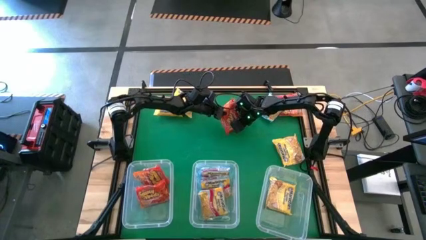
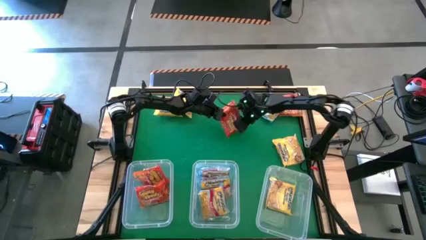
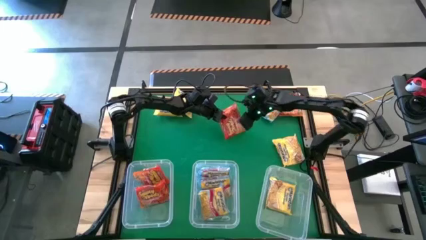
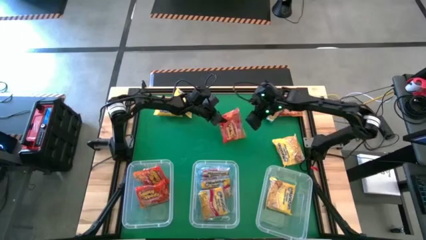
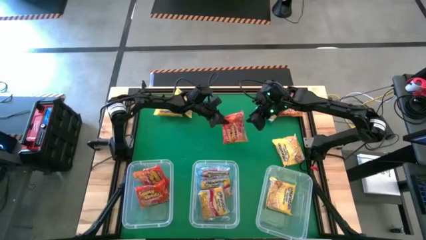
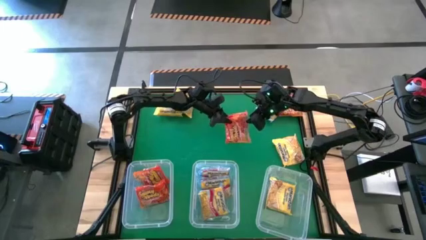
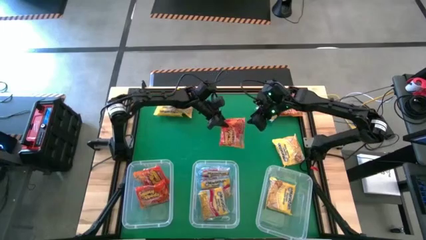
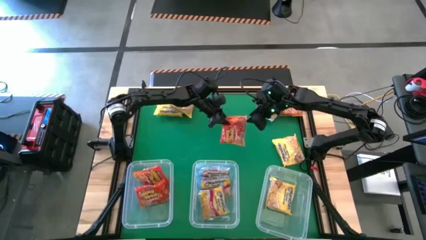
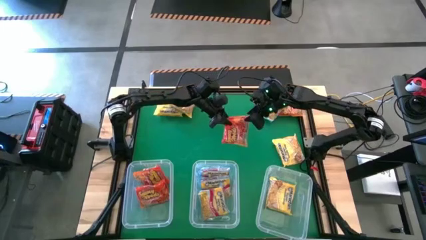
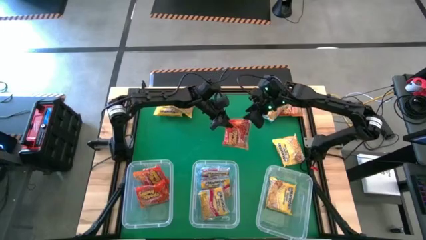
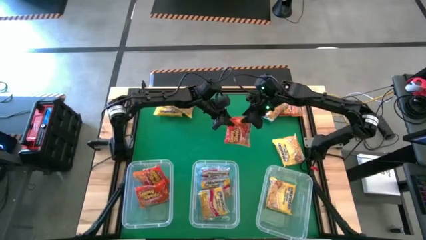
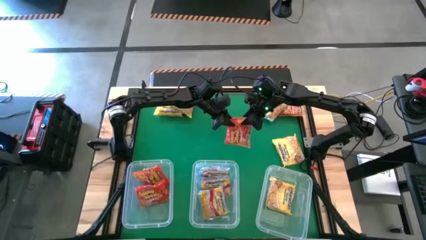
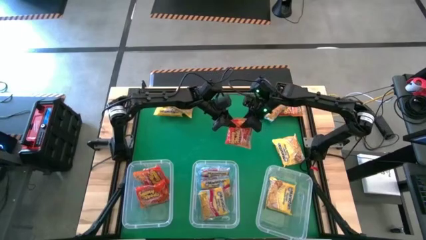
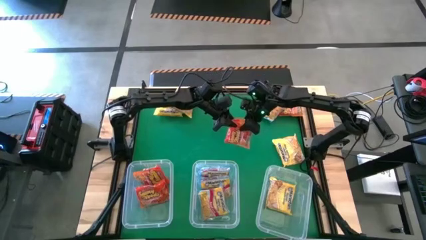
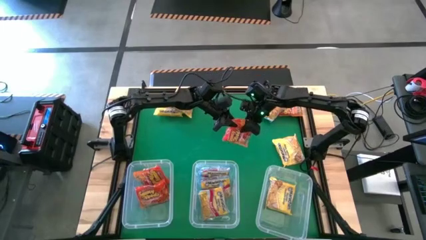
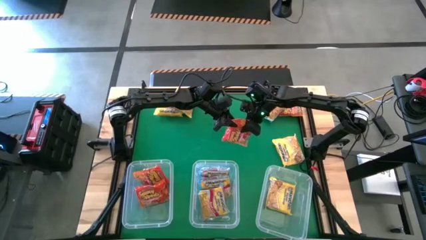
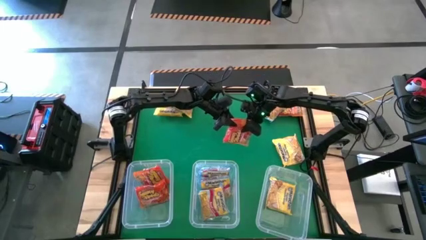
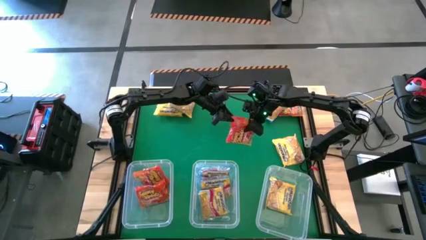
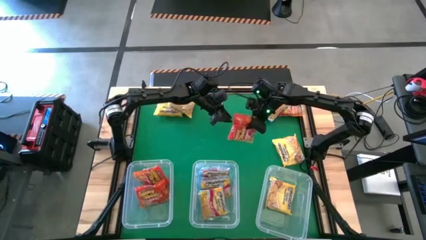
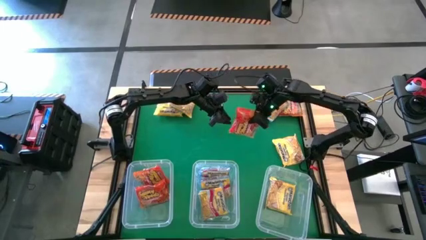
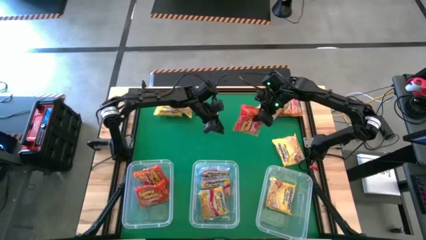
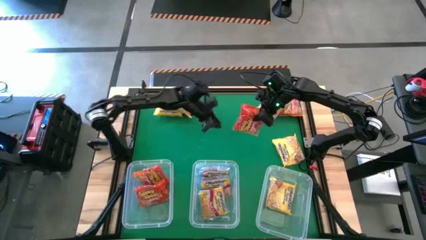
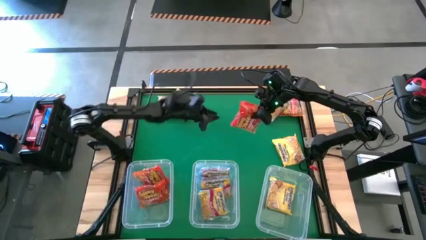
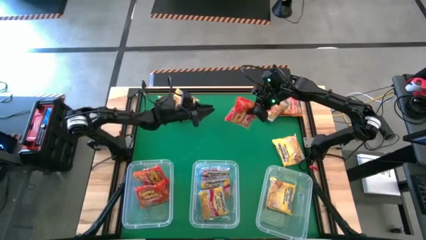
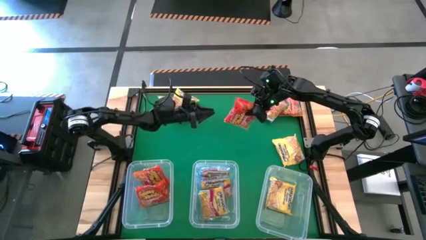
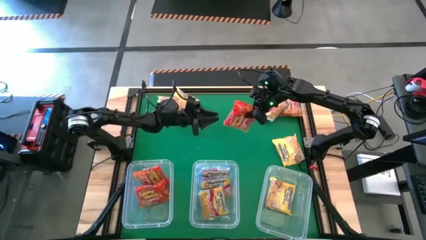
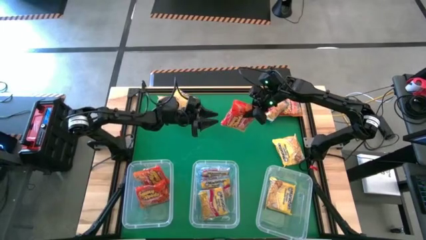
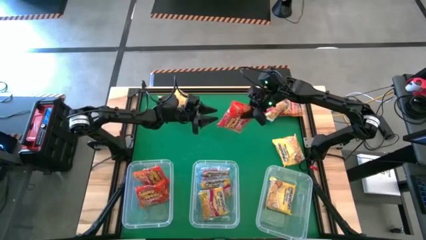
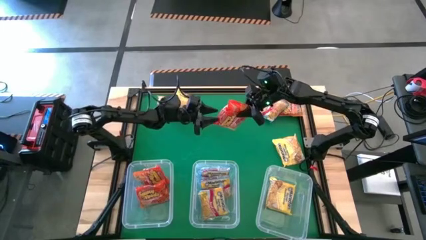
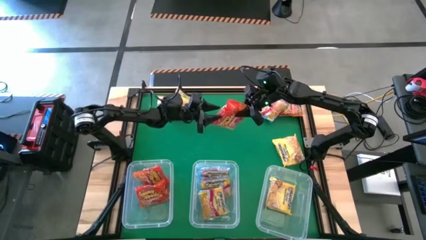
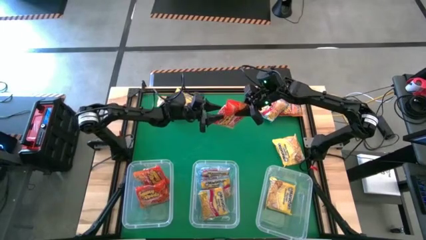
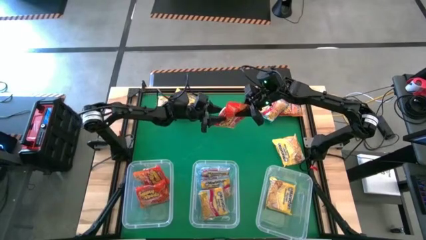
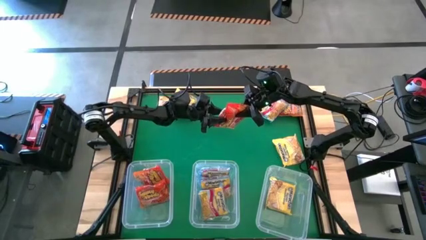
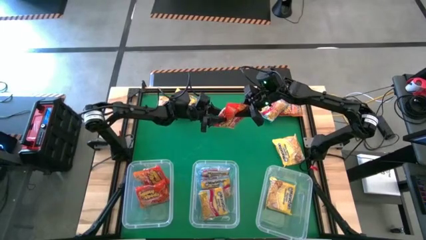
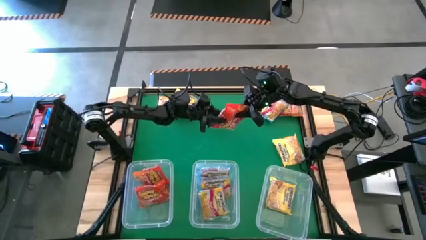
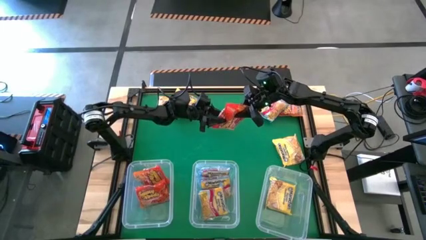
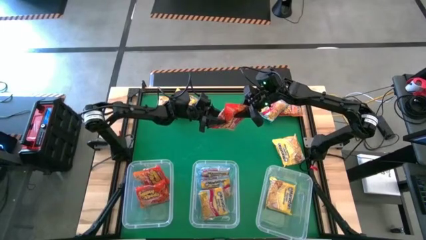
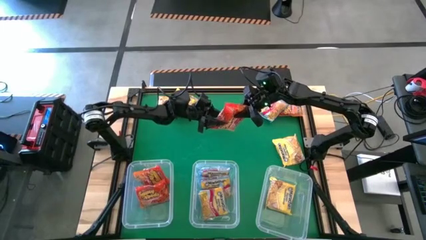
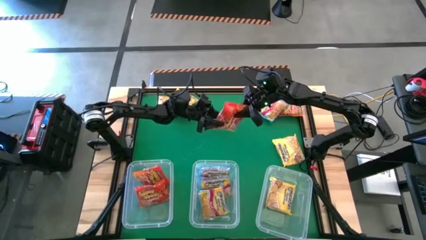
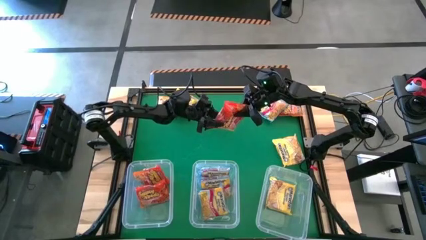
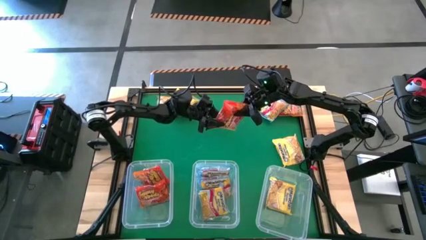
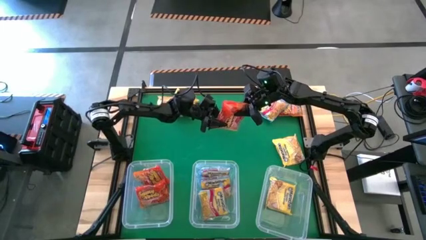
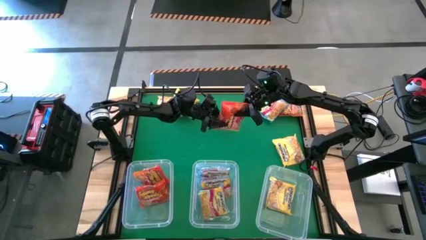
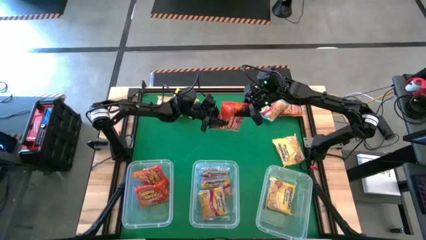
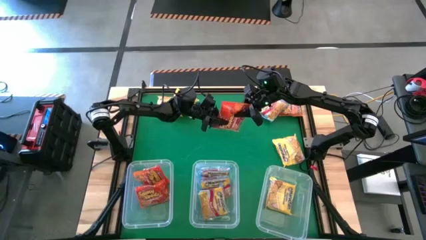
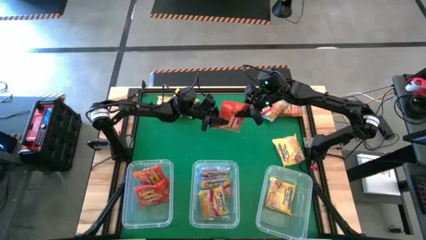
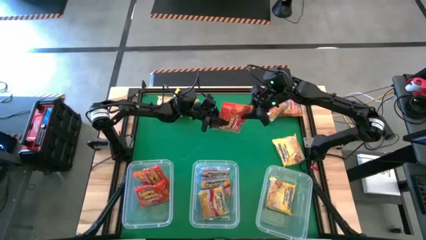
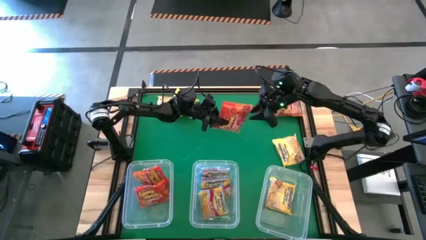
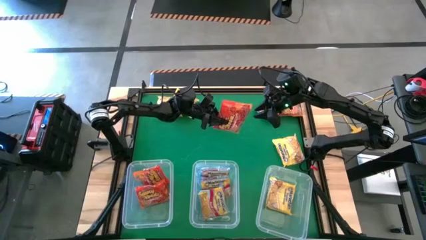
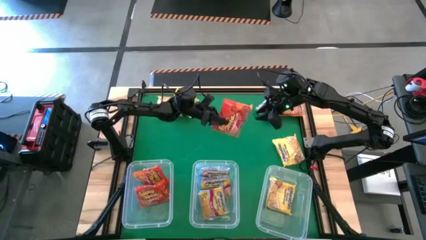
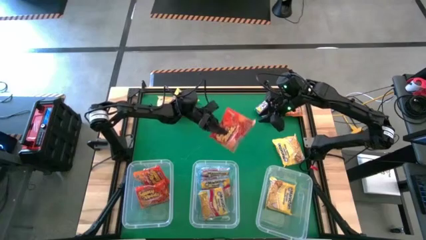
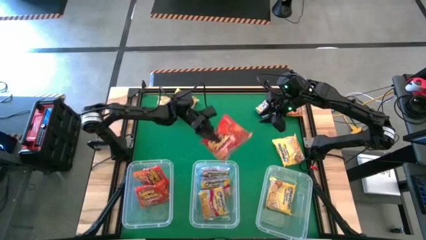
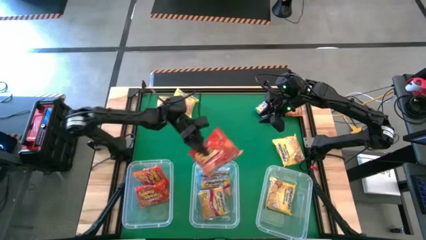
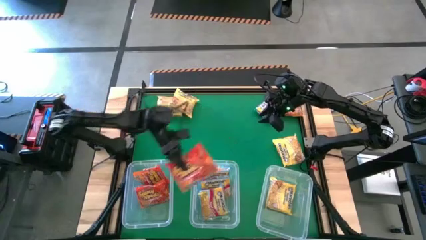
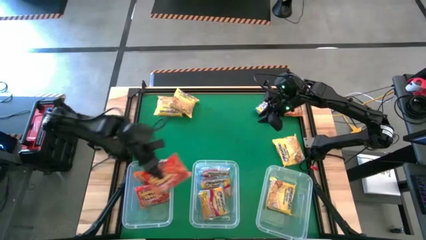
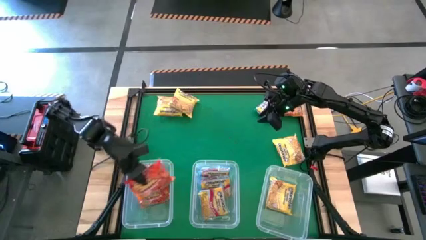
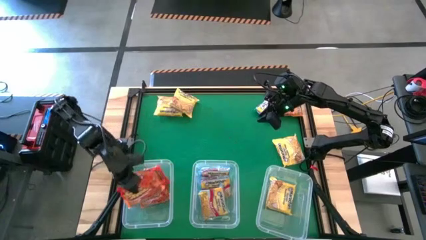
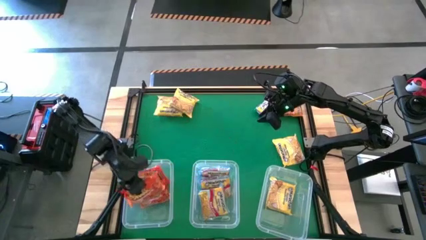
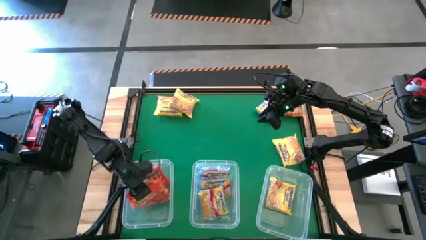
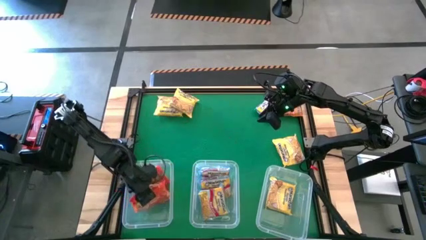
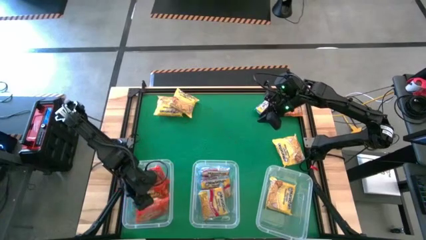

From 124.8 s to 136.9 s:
Task: Sort Maruchan noodles
Put the orange noodle pack into the left transparent bin
